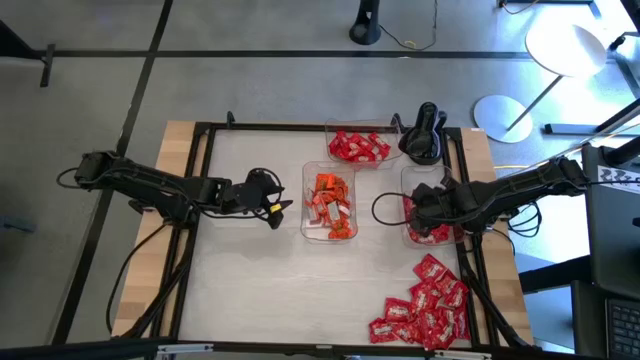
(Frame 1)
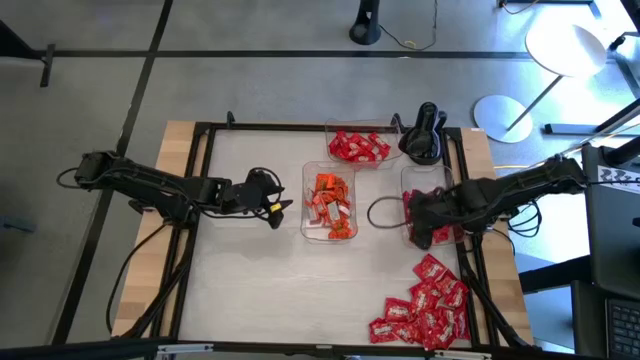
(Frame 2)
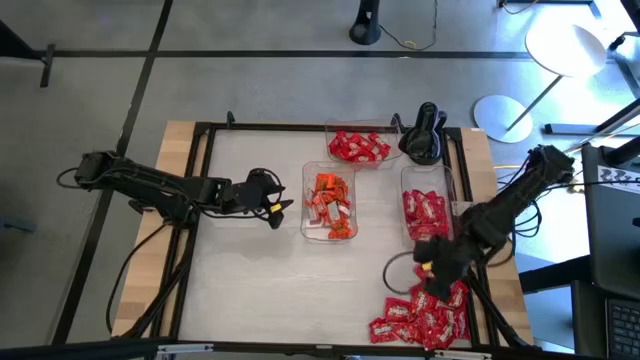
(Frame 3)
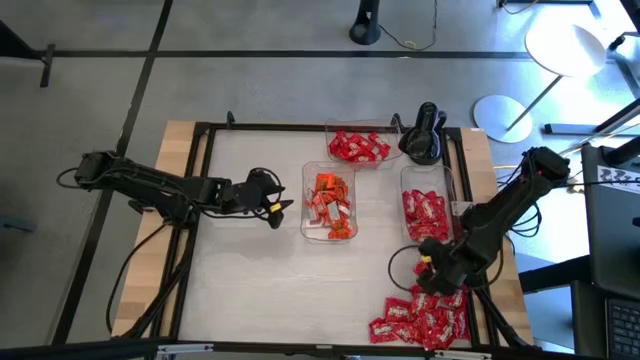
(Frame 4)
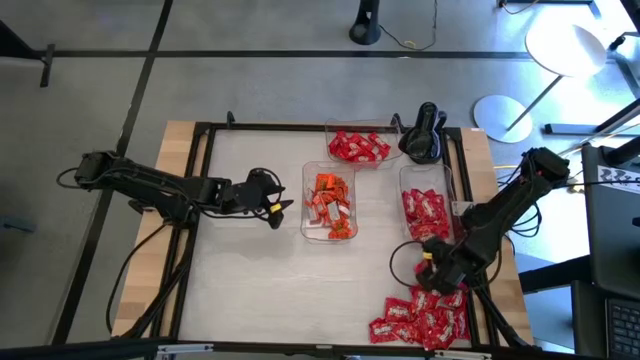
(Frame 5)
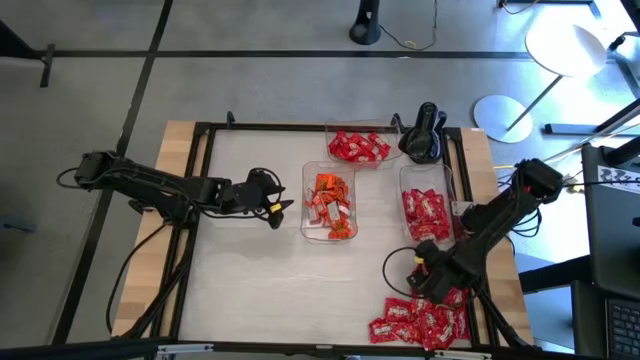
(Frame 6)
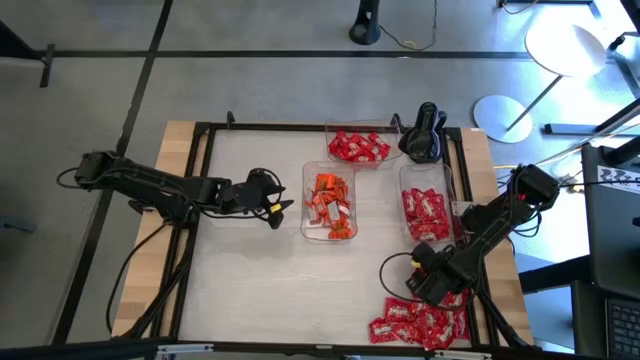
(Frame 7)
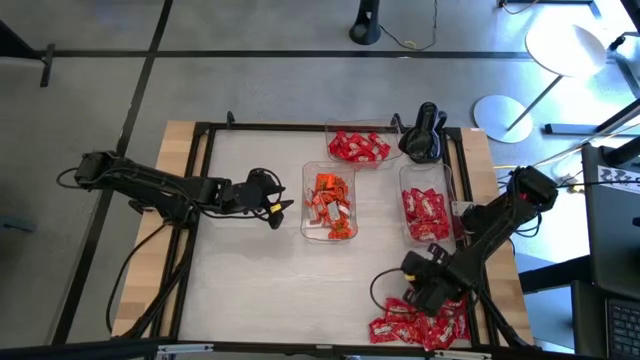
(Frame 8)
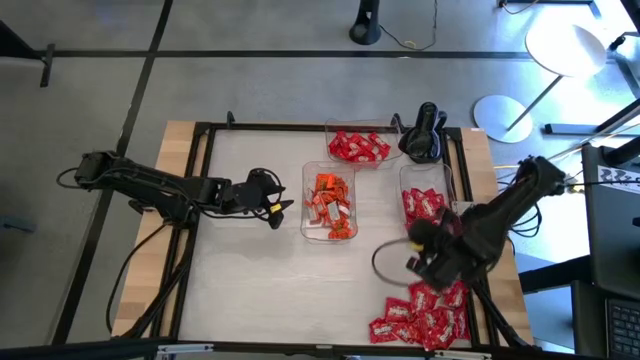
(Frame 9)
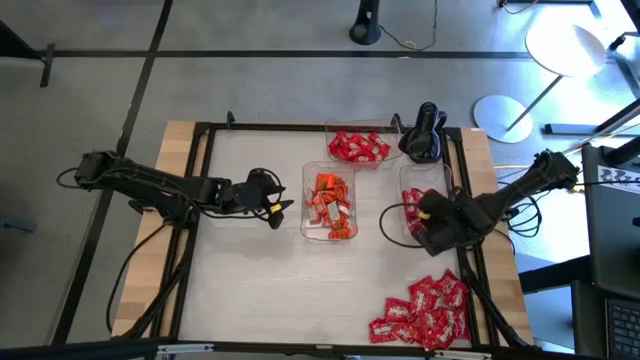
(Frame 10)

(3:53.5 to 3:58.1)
Task: Sort candy
Put the red candy pack into the bottom right transparent bin

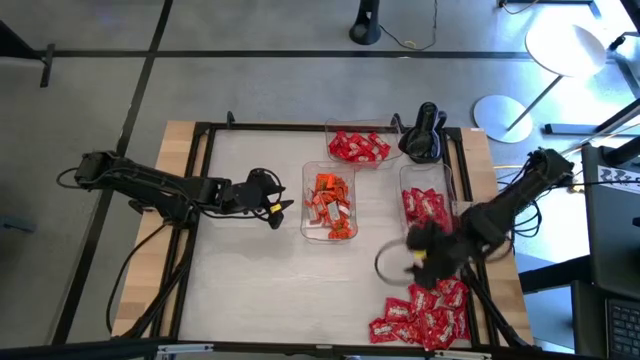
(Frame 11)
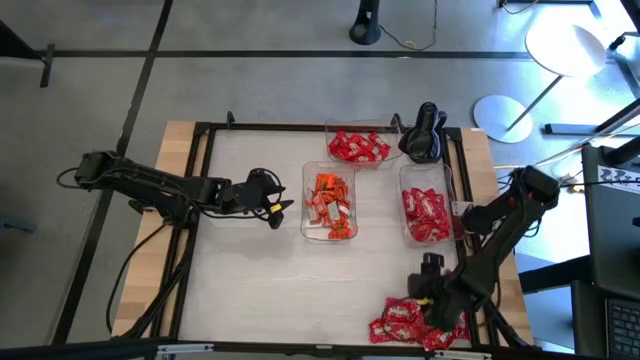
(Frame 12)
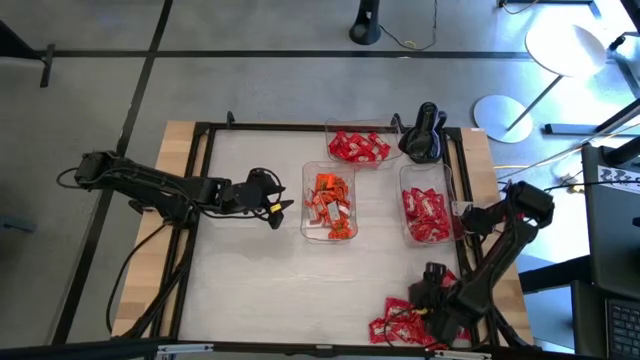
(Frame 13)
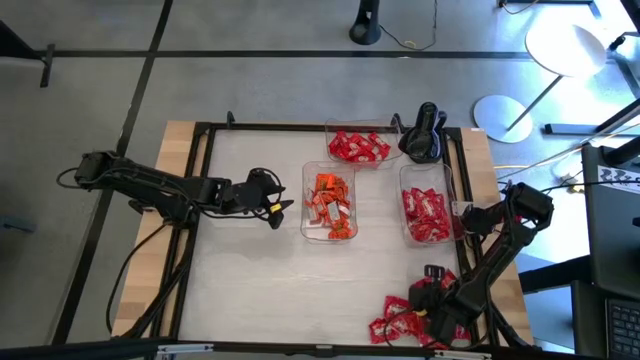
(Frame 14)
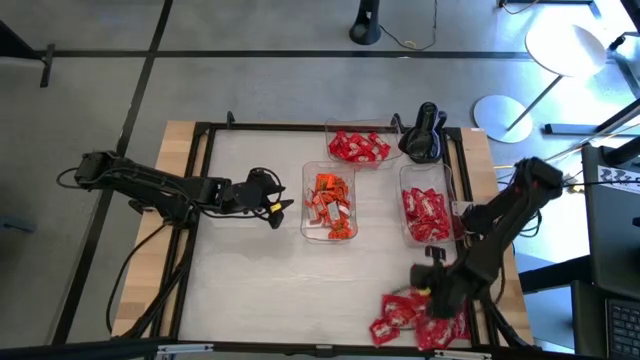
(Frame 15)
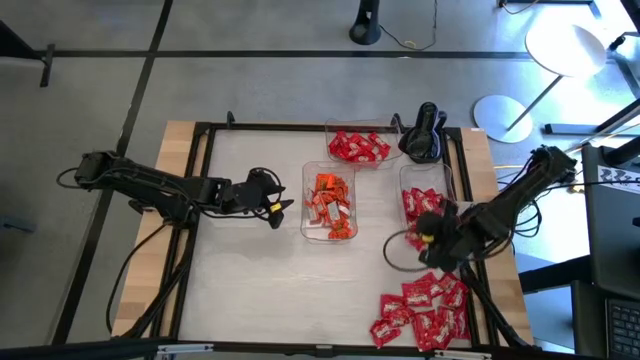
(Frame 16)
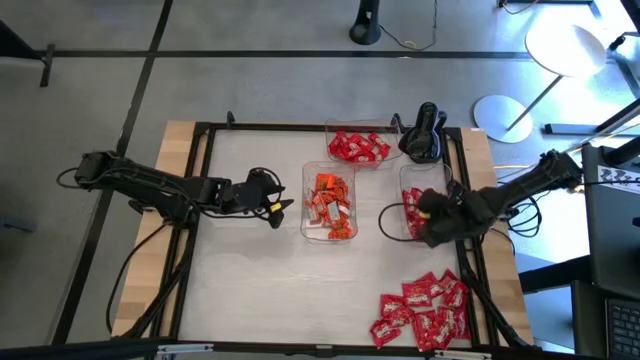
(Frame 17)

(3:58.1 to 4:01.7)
Put the red candy pack into the bottom right transparent bin

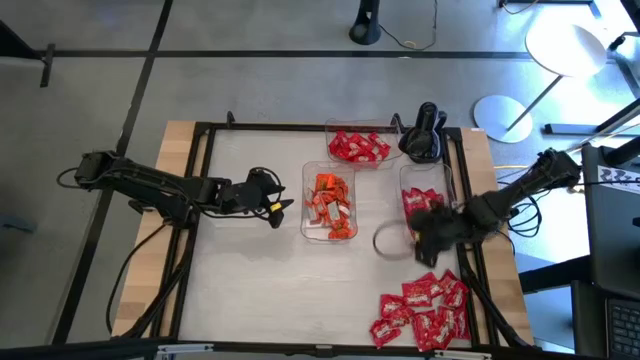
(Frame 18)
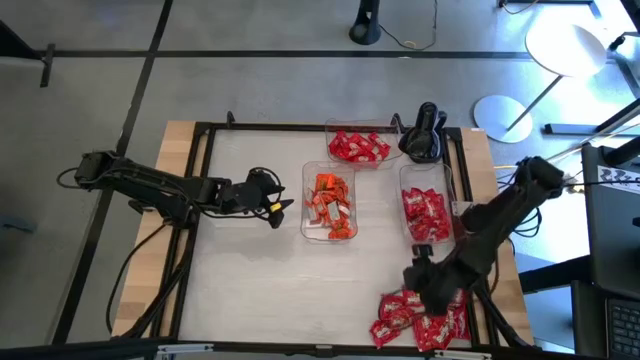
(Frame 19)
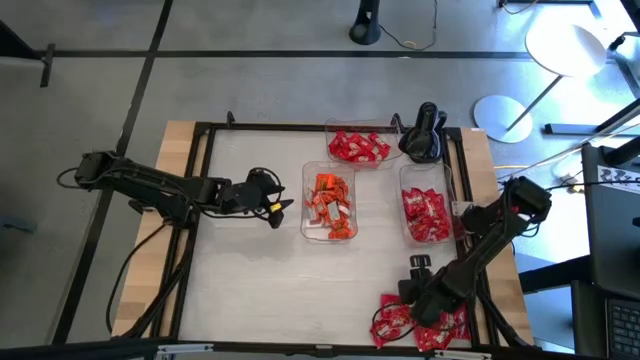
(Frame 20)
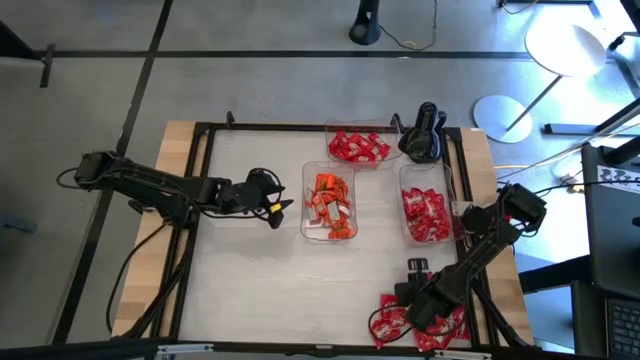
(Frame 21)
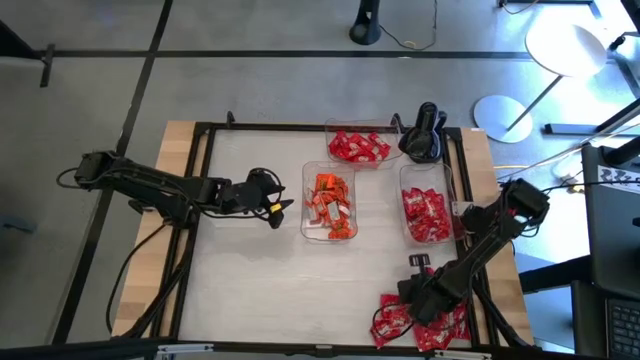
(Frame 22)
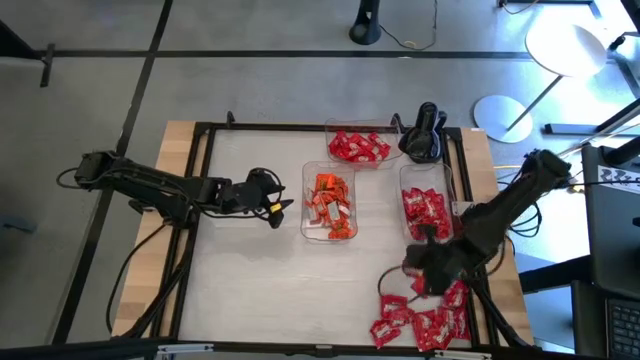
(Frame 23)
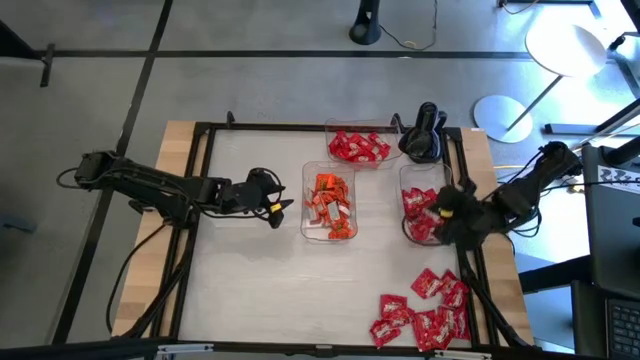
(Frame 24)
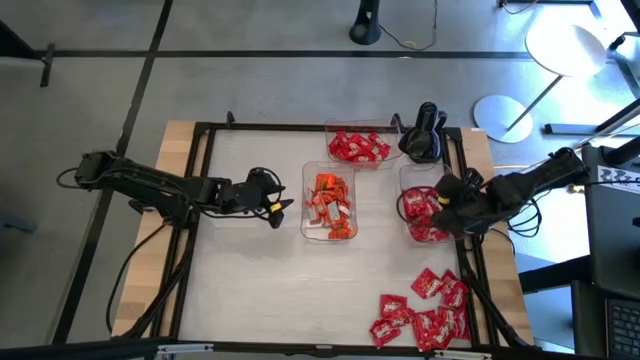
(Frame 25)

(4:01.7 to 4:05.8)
Put the red candy pack into the bottom right transparent bin

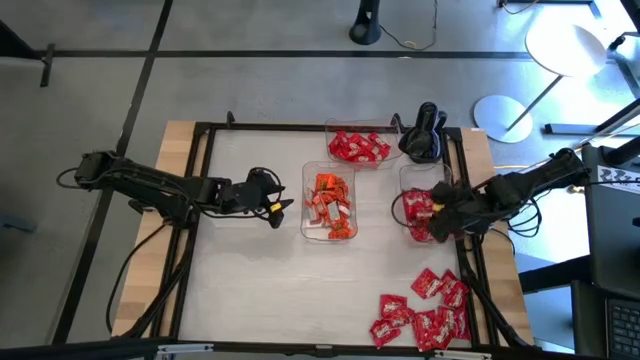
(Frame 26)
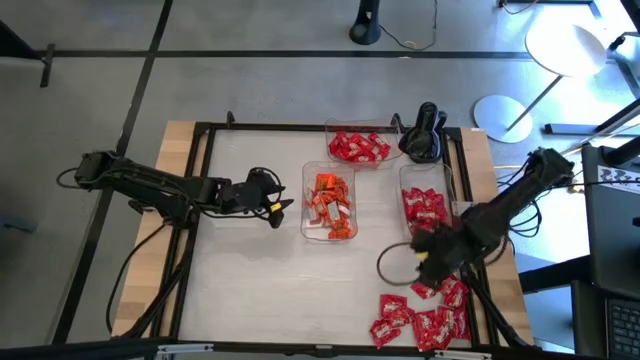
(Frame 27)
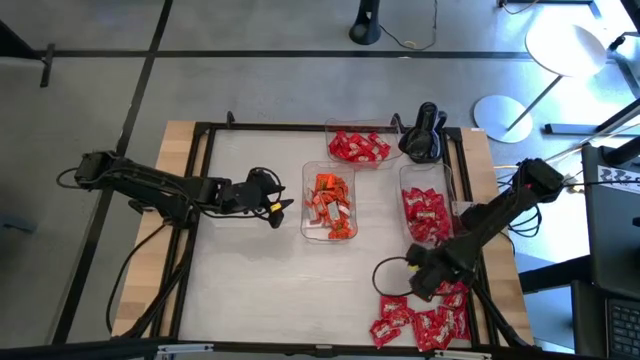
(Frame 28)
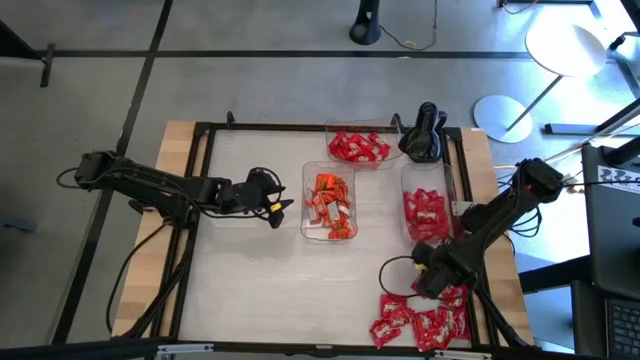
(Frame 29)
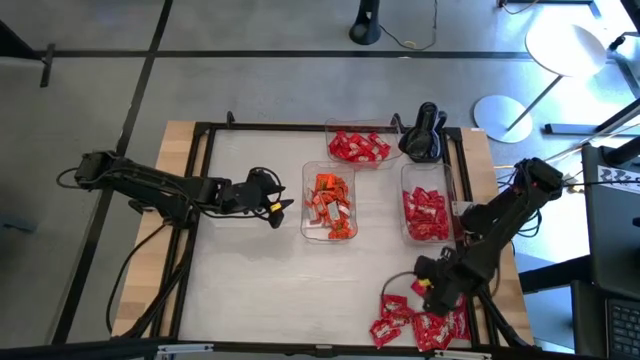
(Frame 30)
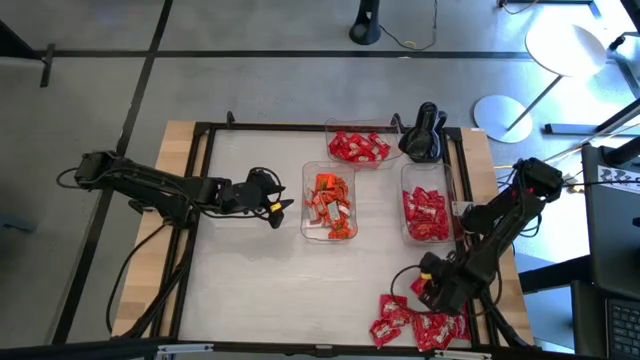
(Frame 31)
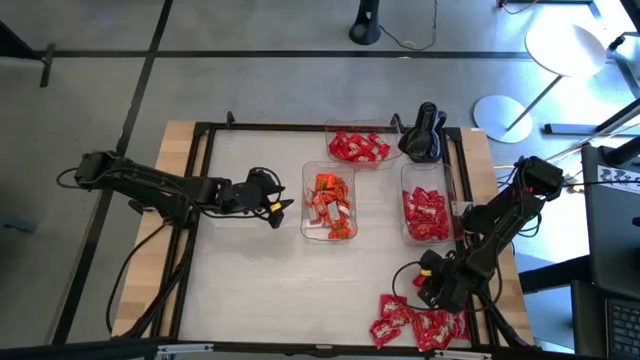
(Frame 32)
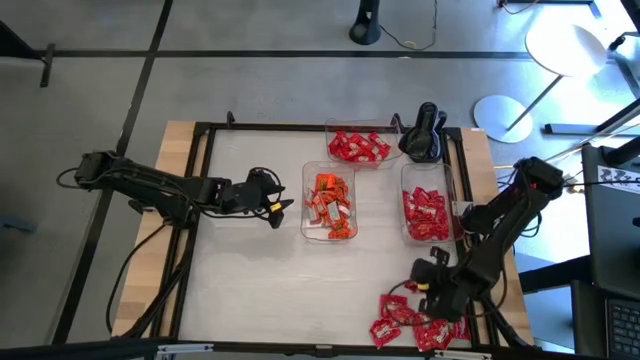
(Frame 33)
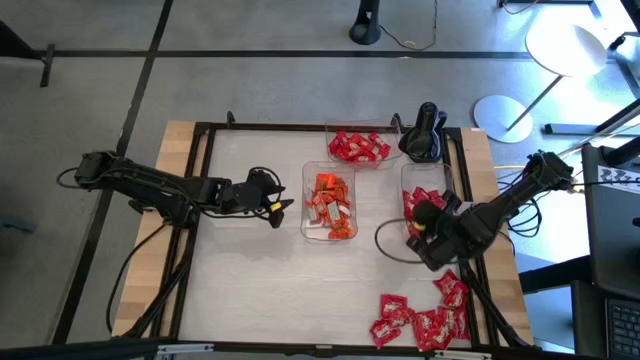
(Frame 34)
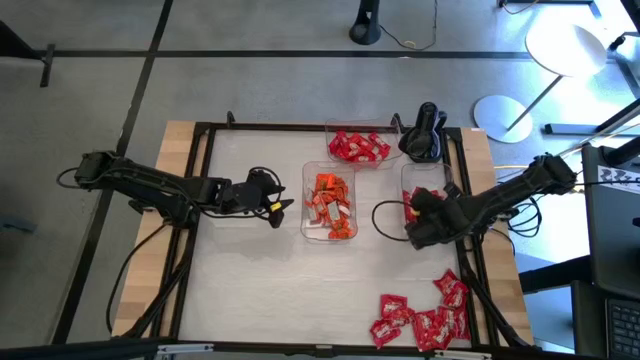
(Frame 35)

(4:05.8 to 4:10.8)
Put the red candy pack into the bottom right transparent bin

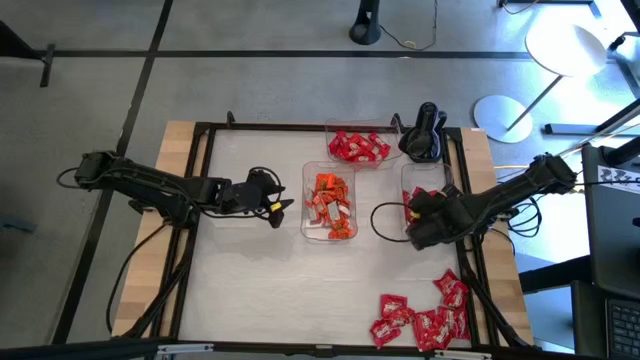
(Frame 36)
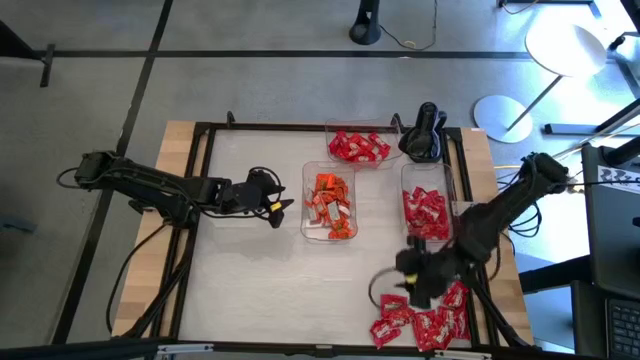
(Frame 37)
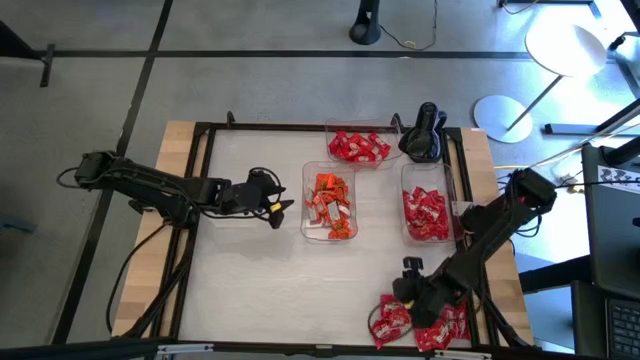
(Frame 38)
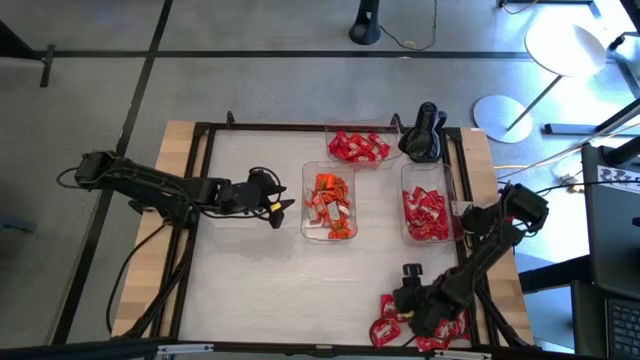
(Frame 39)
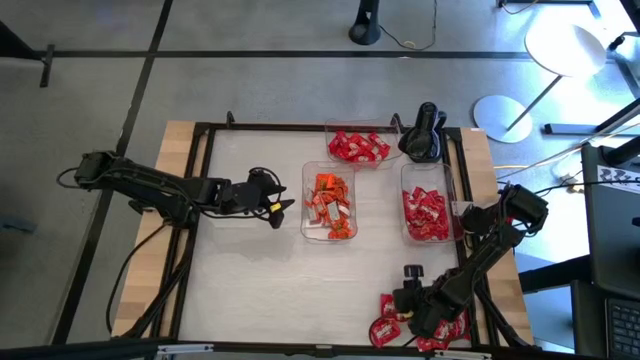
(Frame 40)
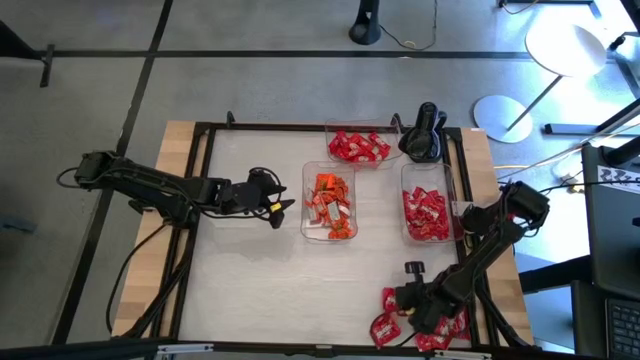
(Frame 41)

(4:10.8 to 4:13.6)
Put the red candy pack into the bottom right transparent bin

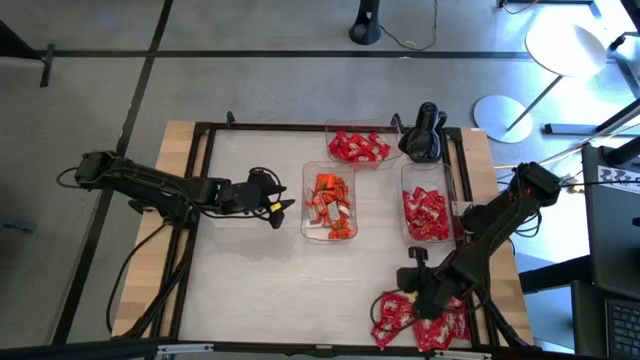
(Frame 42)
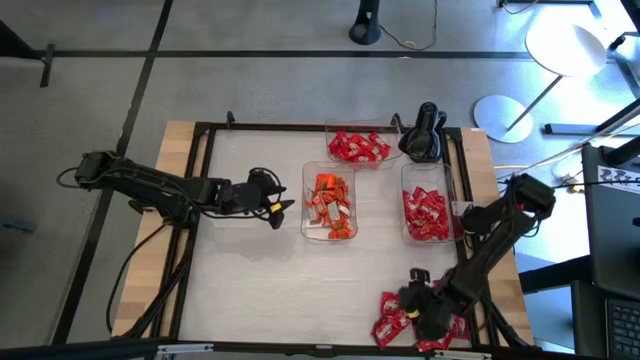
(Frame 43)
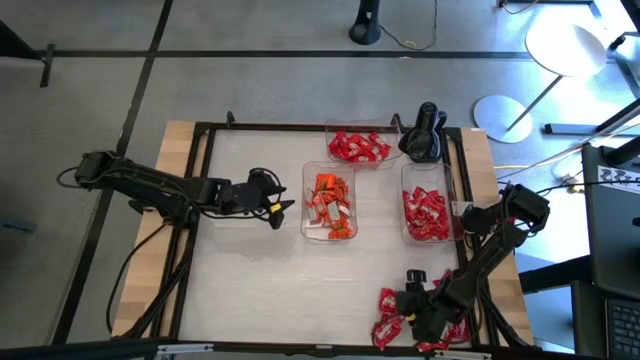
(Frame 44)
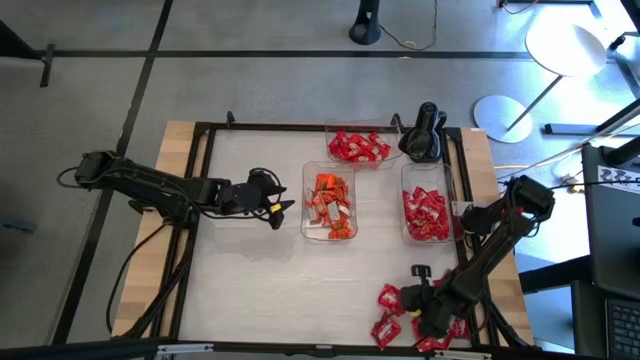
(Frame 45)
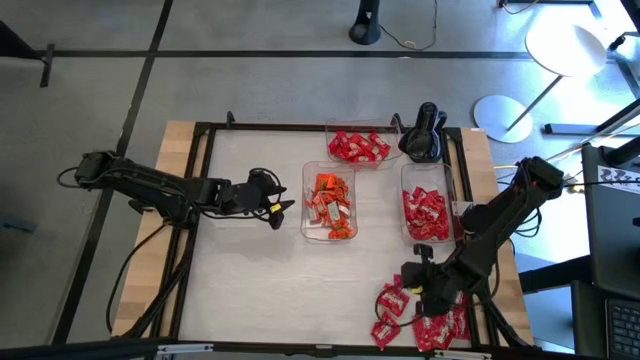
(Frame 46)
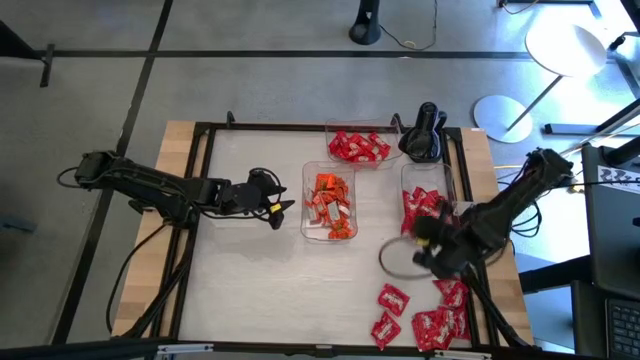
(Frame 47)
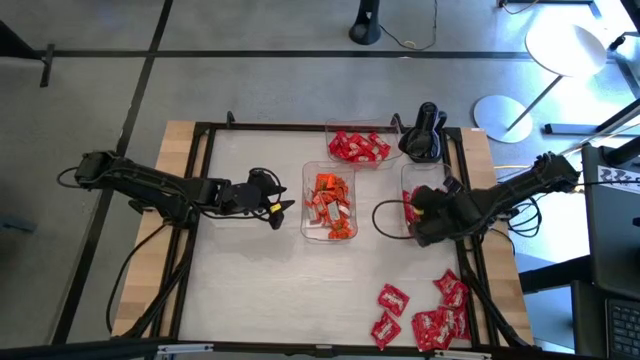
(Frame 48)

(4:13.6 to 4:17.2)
Put the red candy pack into the bottom right transparent bin
